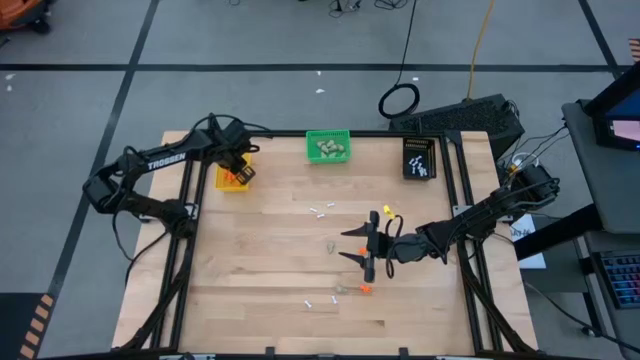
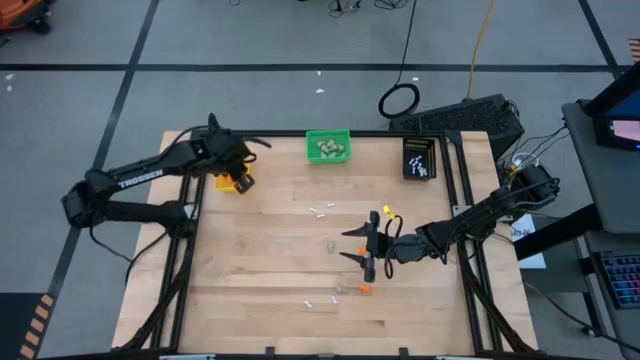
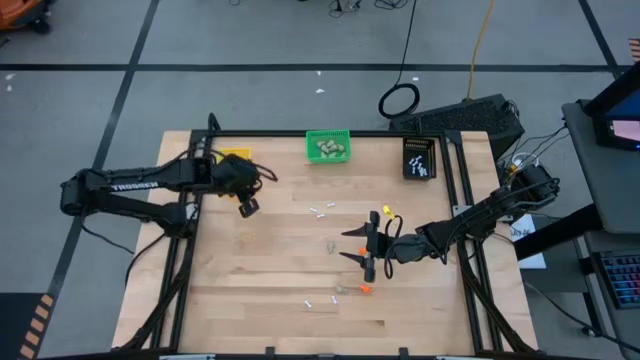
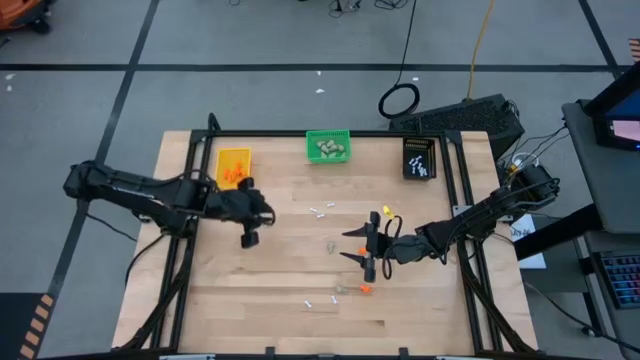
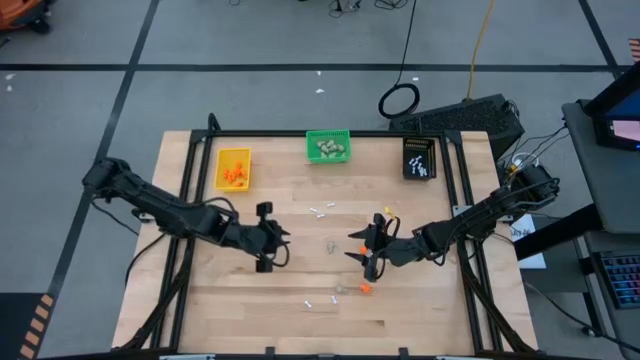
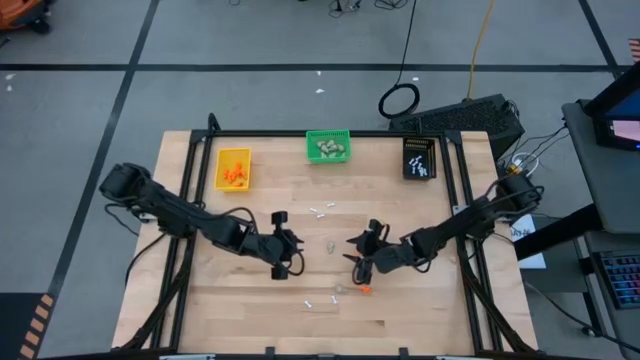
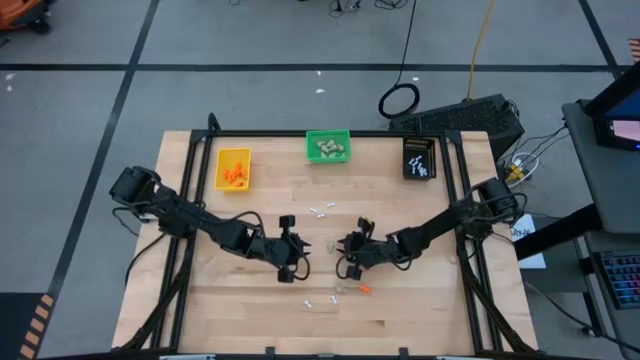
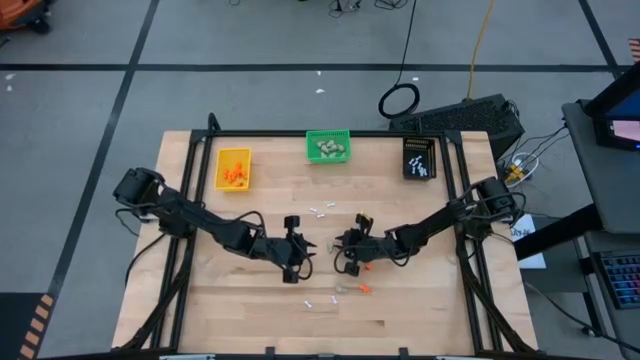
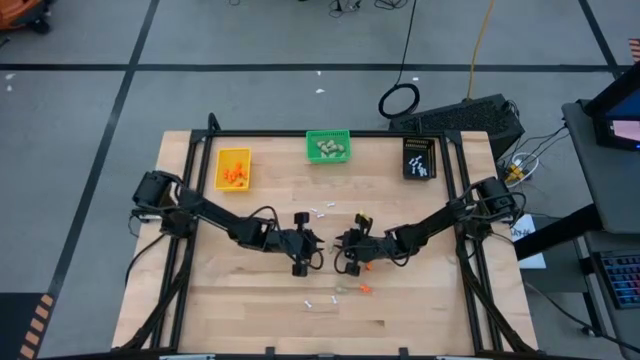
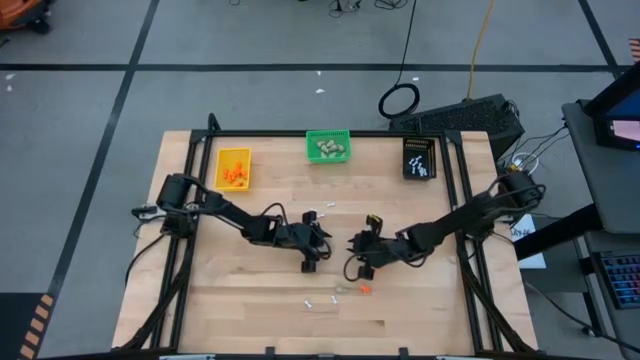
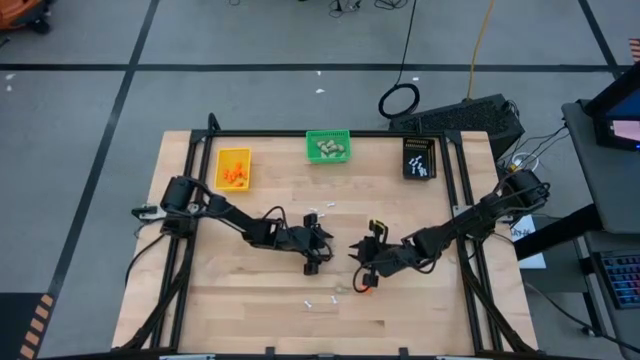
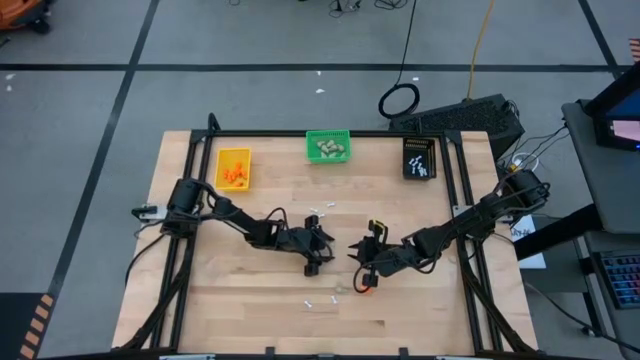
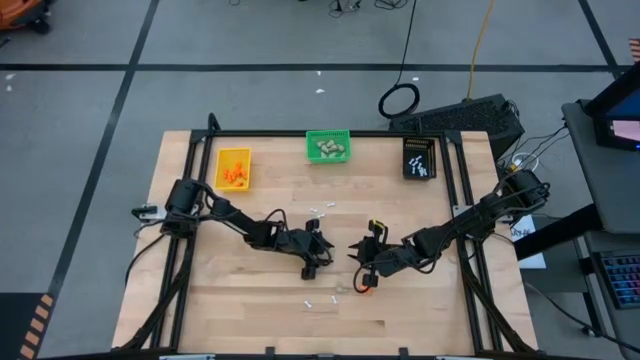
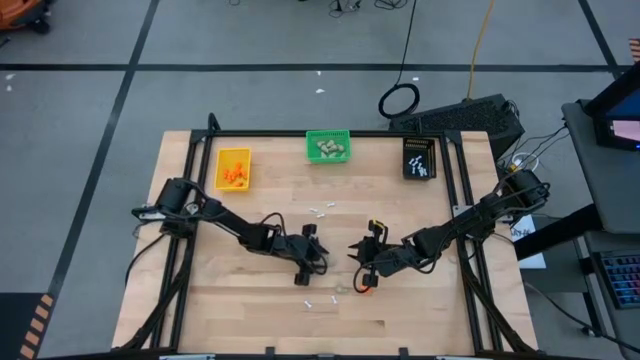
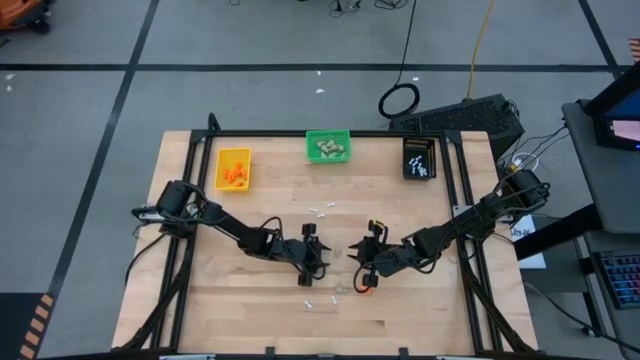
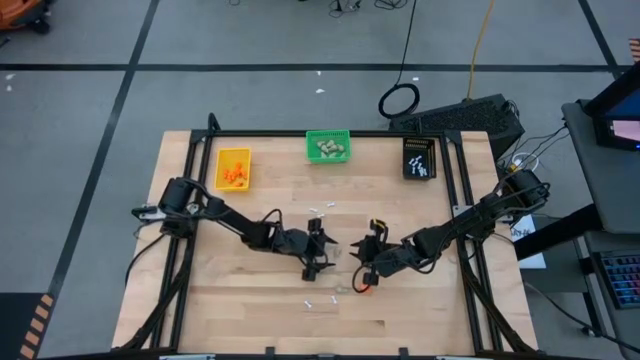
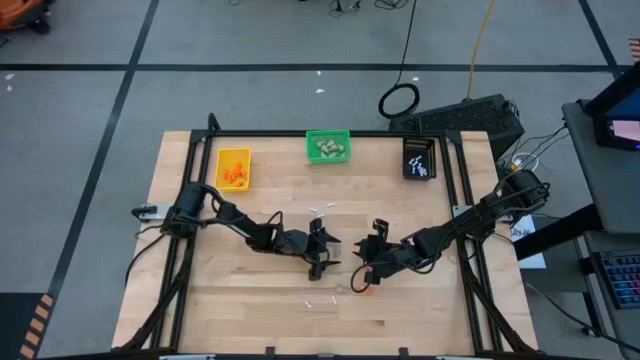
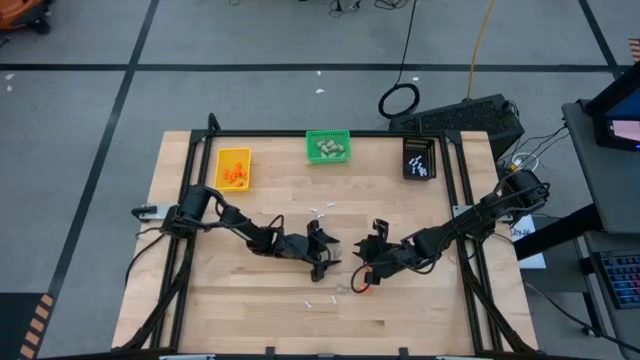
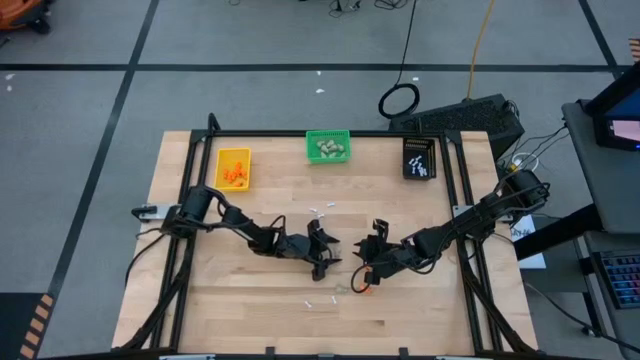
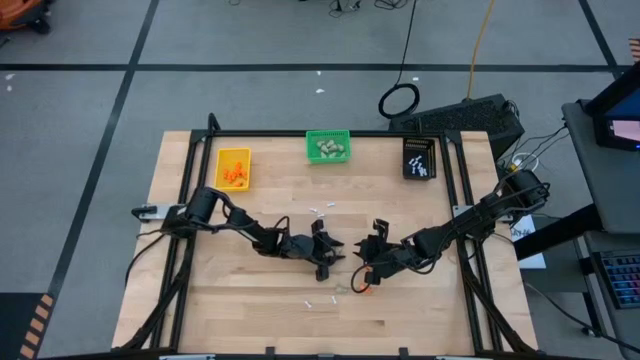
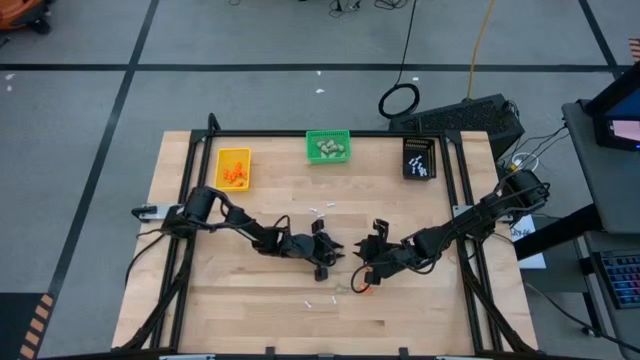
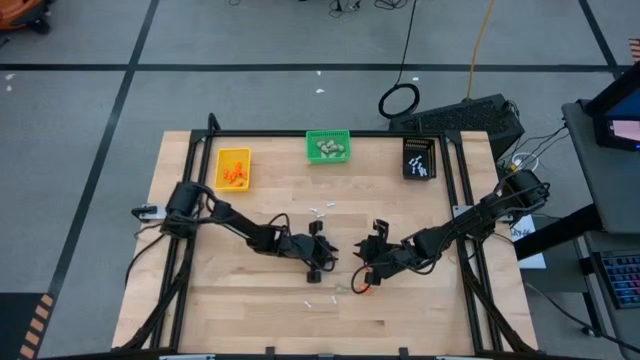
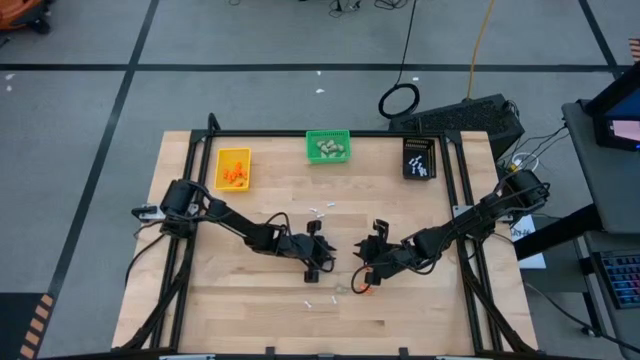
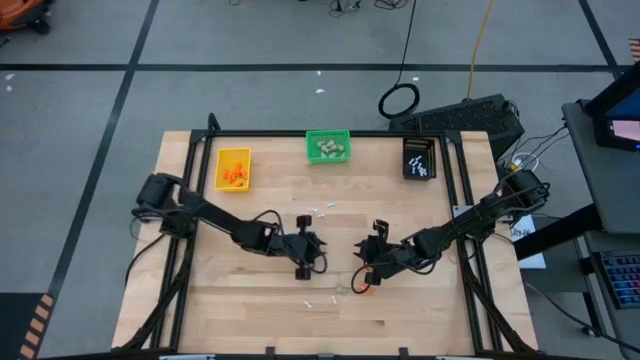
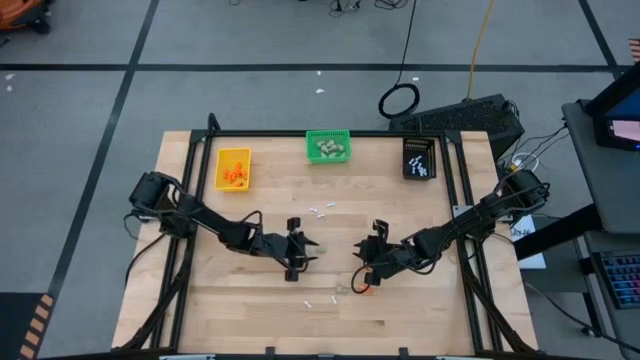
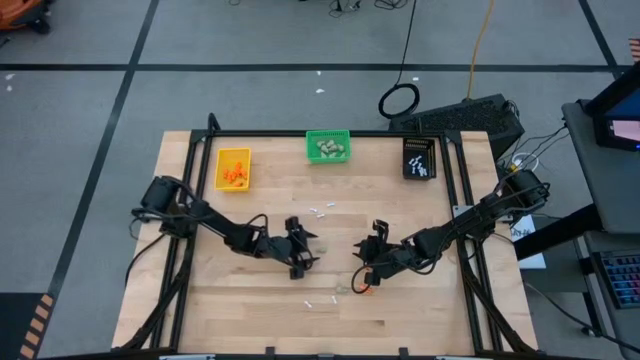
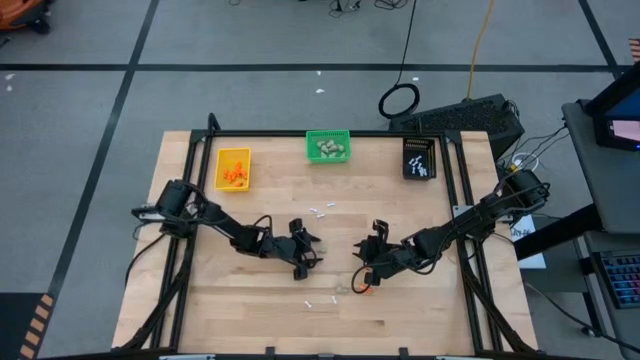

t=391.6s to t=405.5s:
Task: Sort Halloween decoration
Put the gray skull toy into the green bin

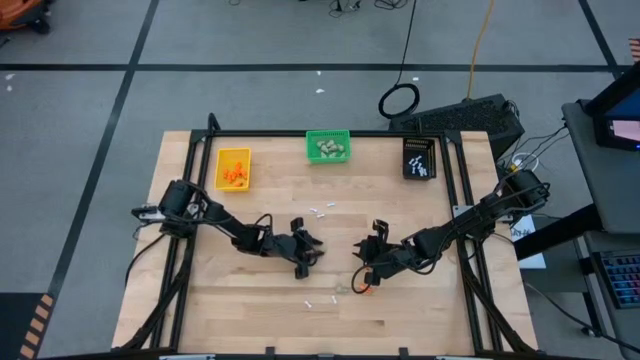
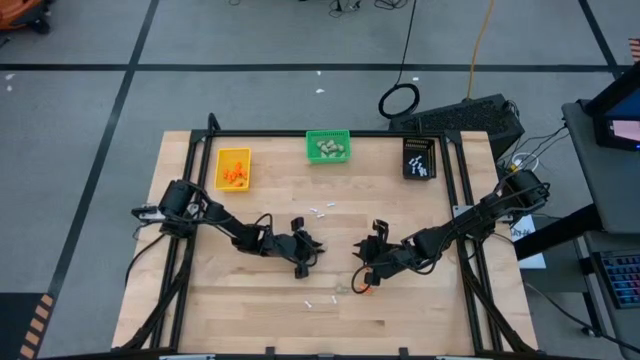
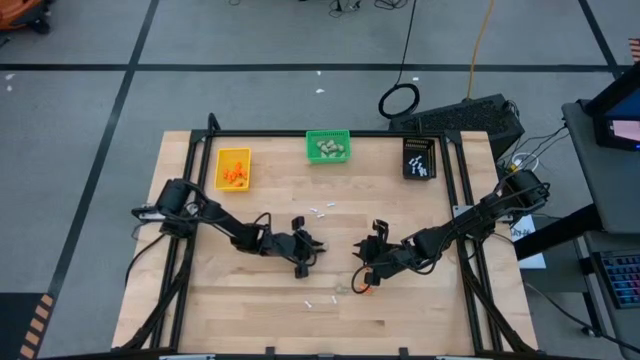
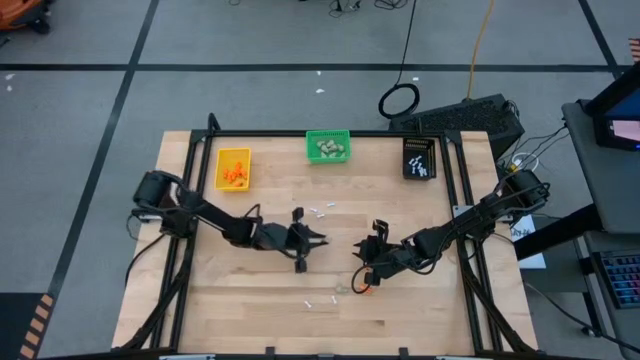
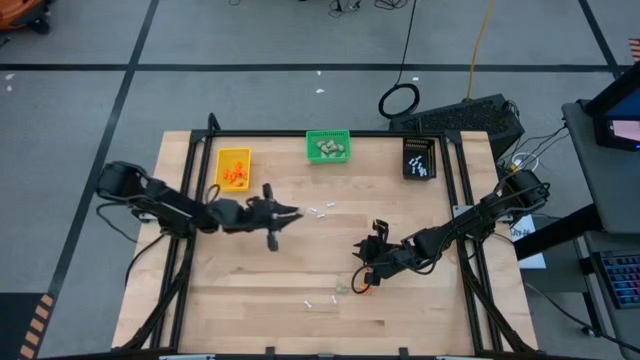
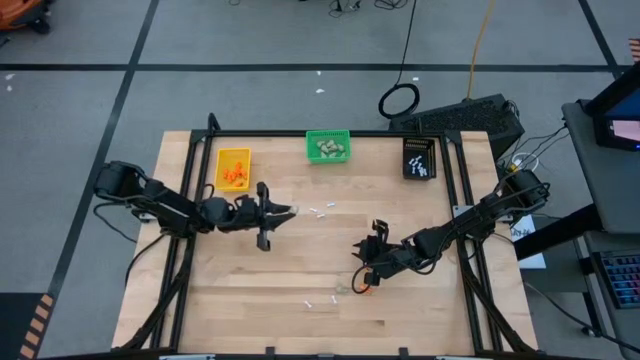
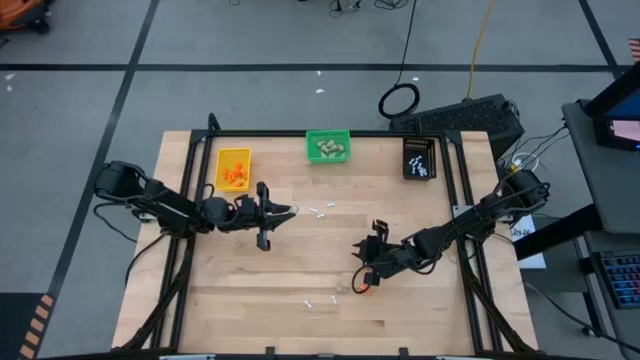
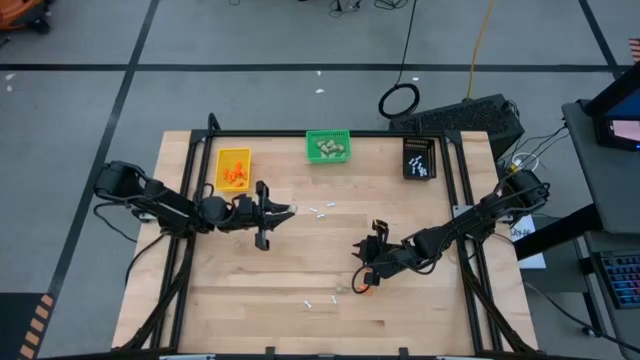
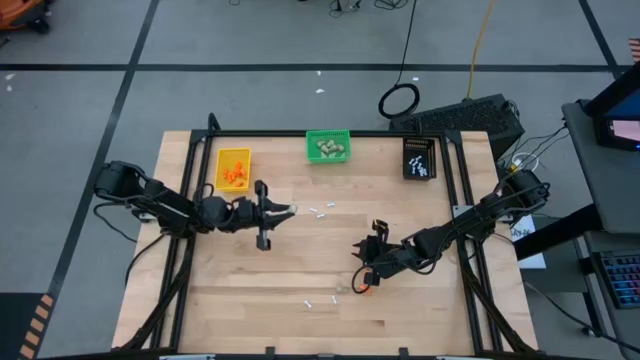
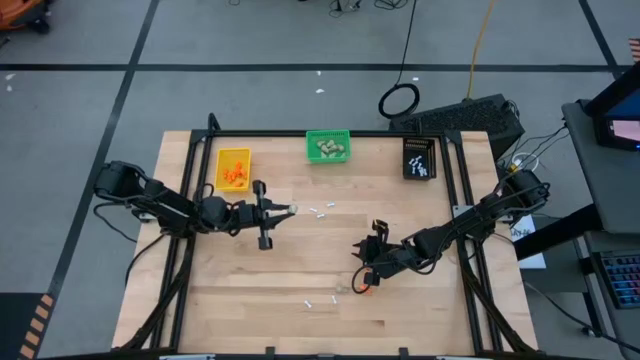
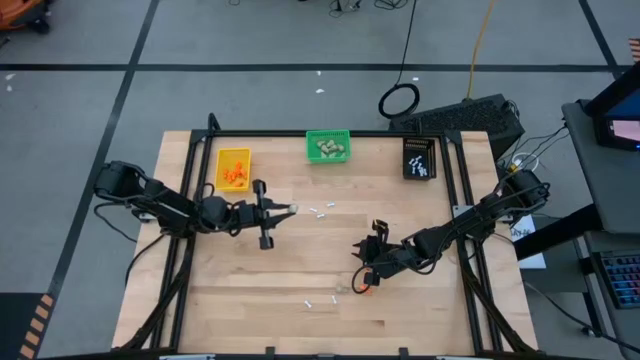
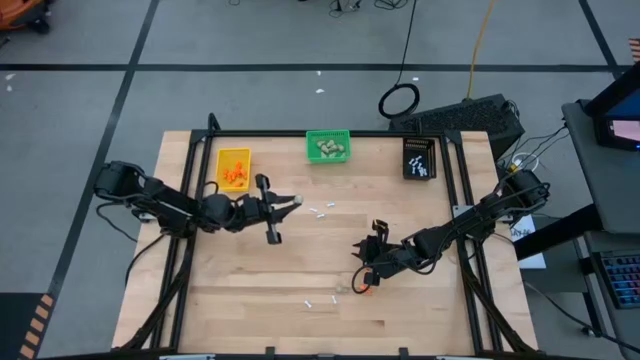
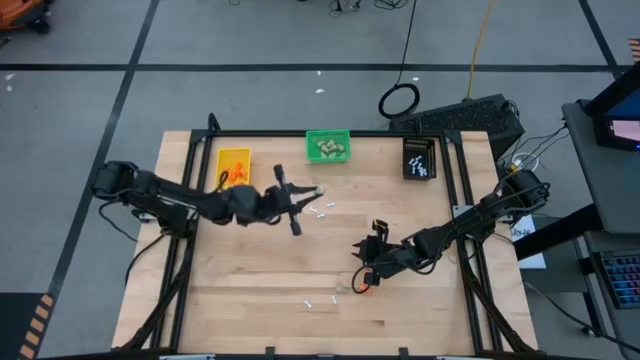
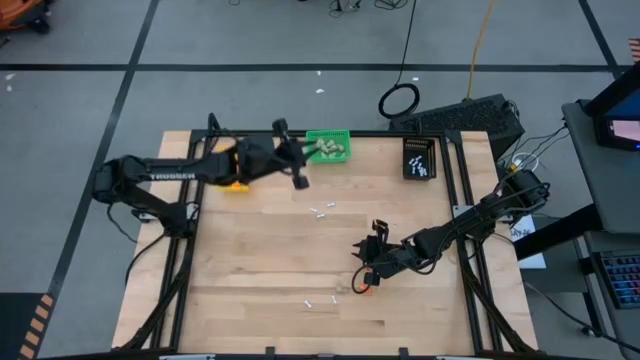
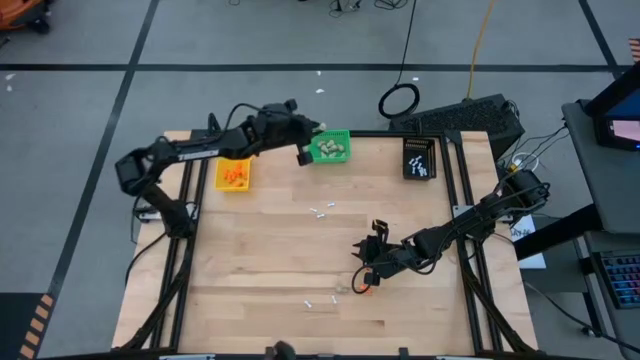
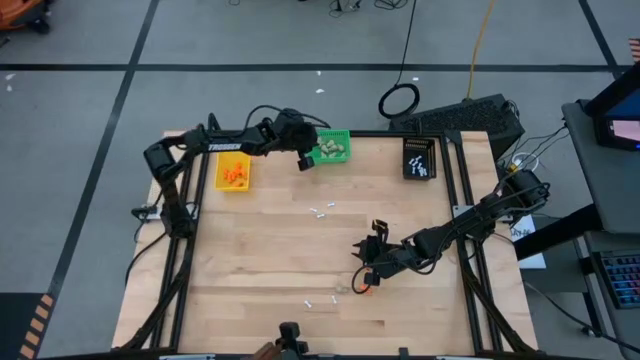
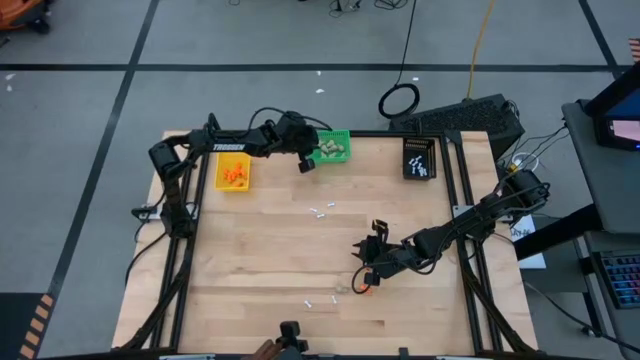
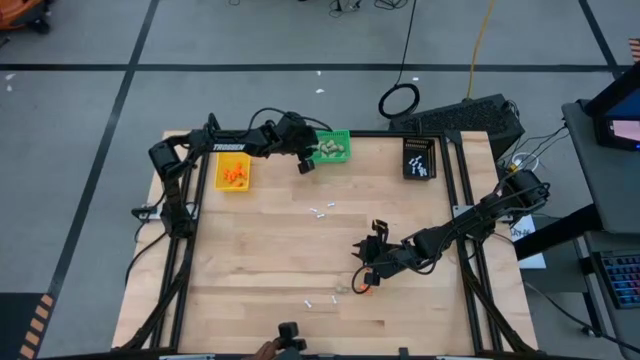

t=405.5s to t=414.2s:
Put the gray skull toy into the green bin
